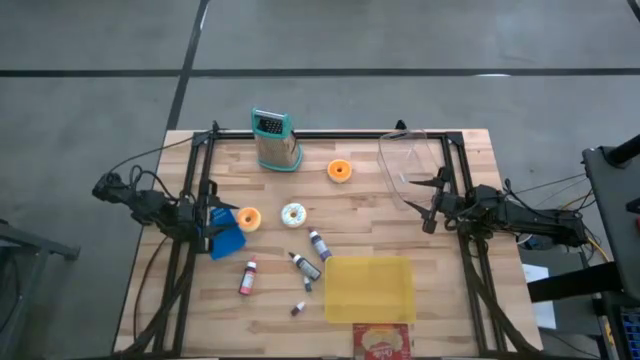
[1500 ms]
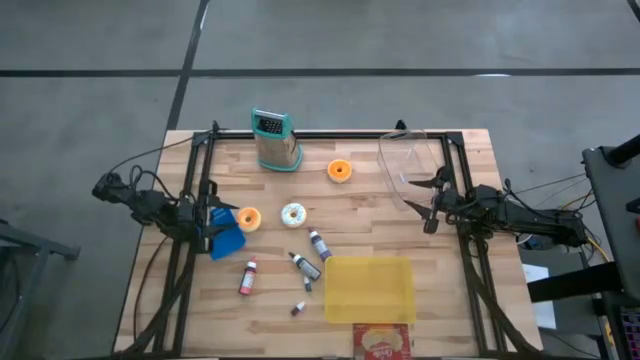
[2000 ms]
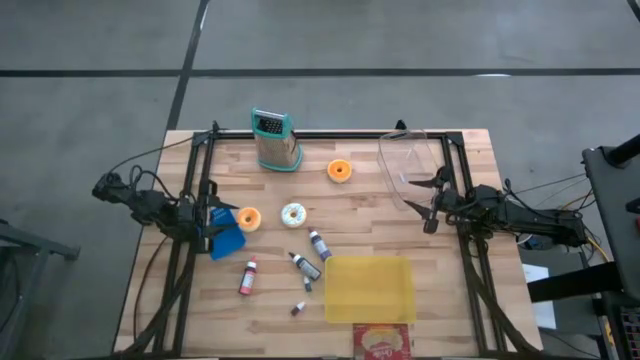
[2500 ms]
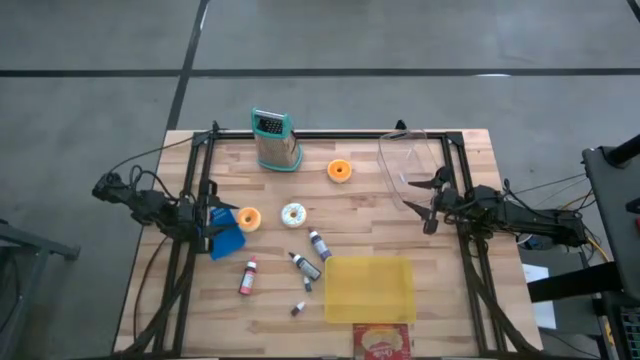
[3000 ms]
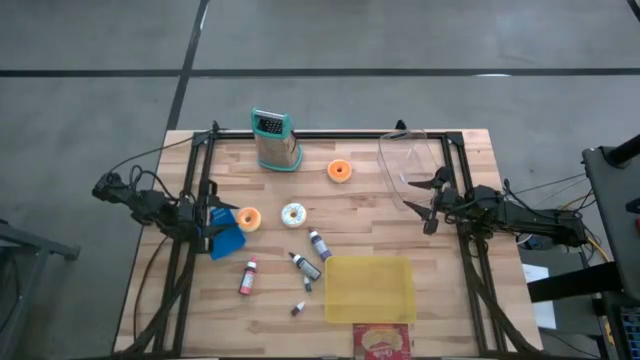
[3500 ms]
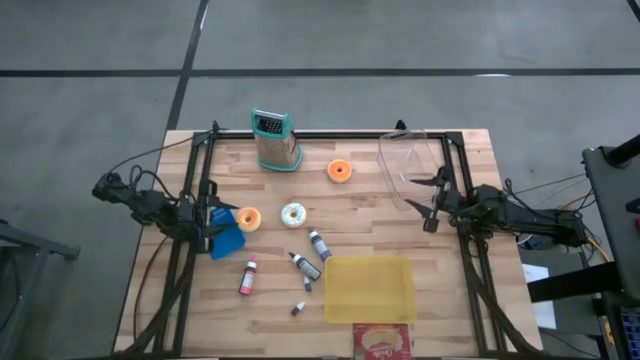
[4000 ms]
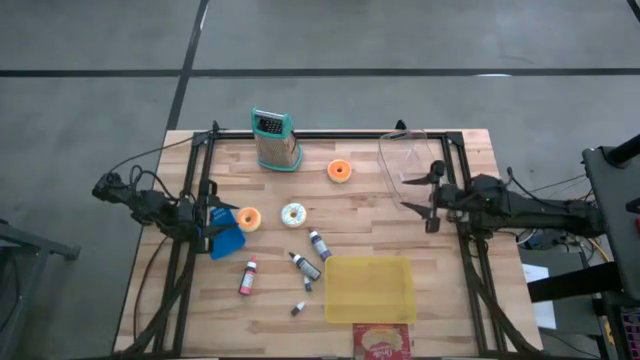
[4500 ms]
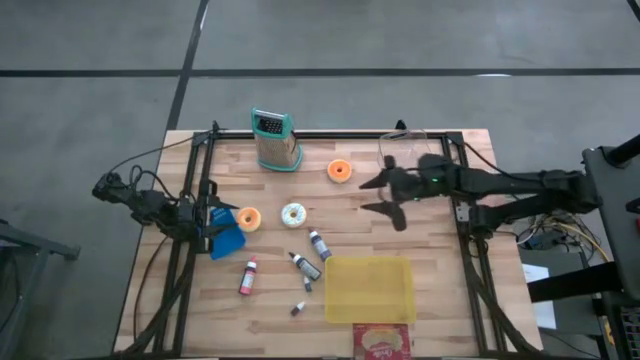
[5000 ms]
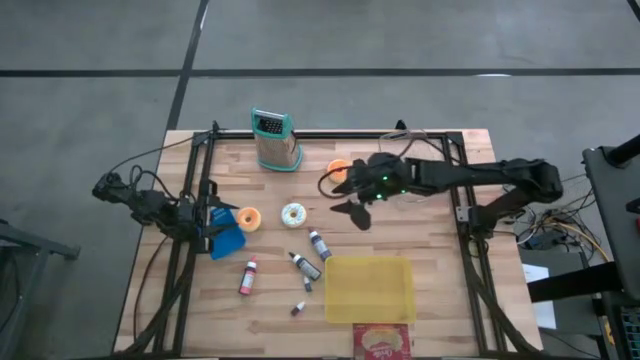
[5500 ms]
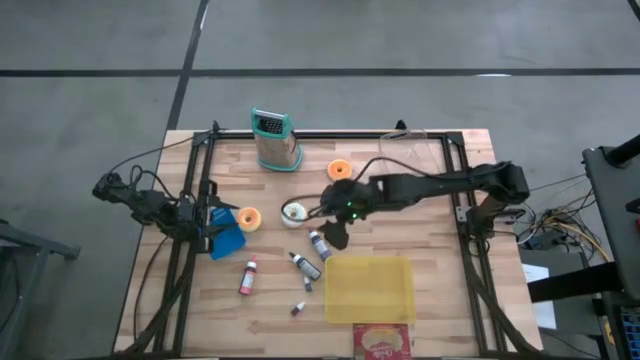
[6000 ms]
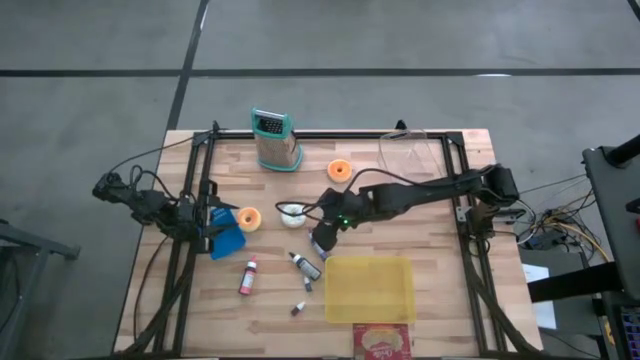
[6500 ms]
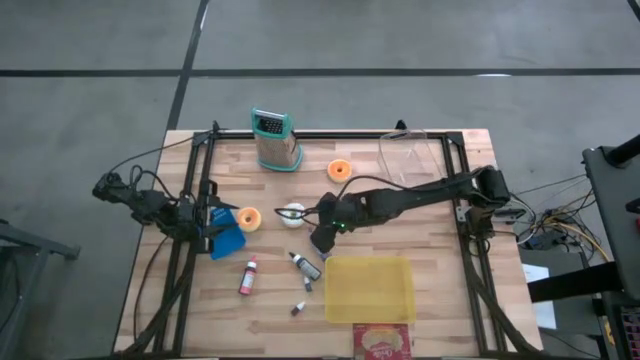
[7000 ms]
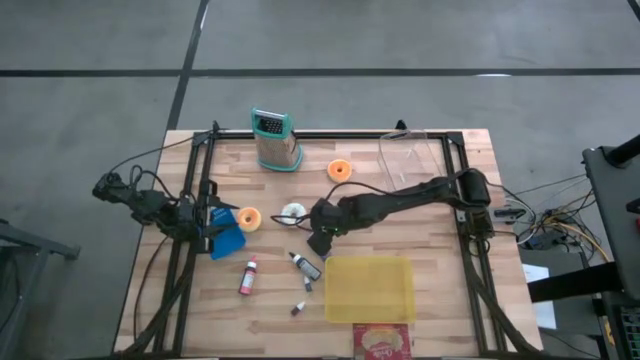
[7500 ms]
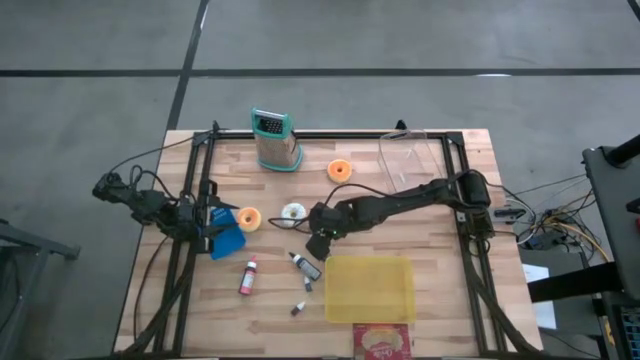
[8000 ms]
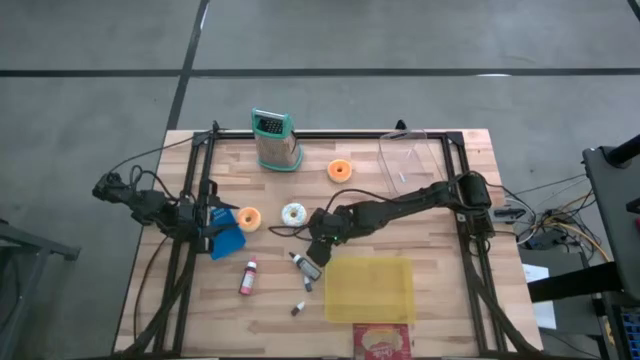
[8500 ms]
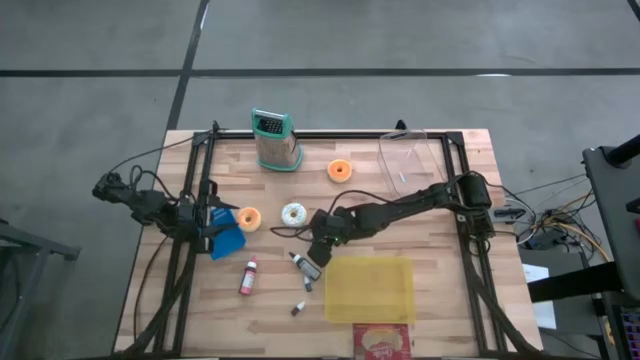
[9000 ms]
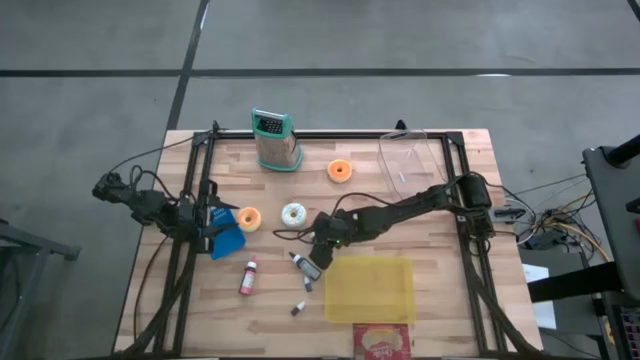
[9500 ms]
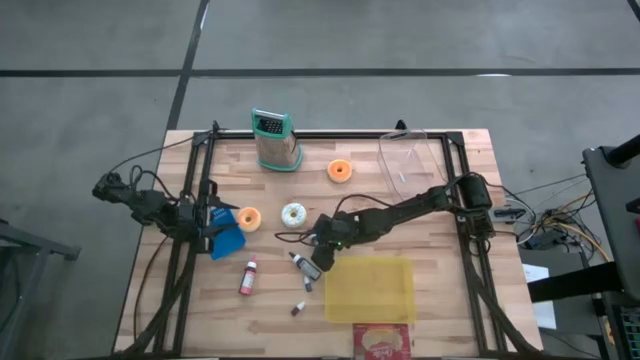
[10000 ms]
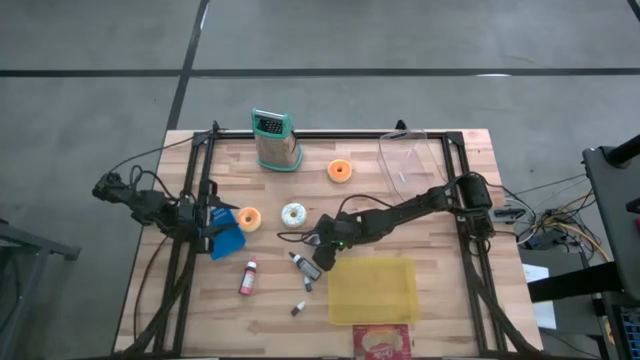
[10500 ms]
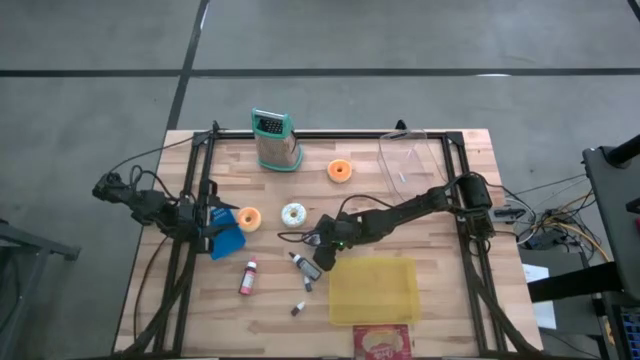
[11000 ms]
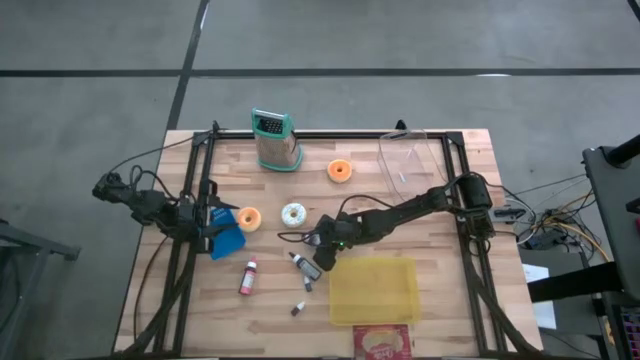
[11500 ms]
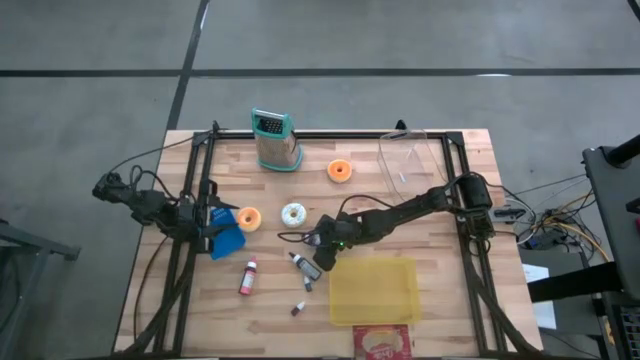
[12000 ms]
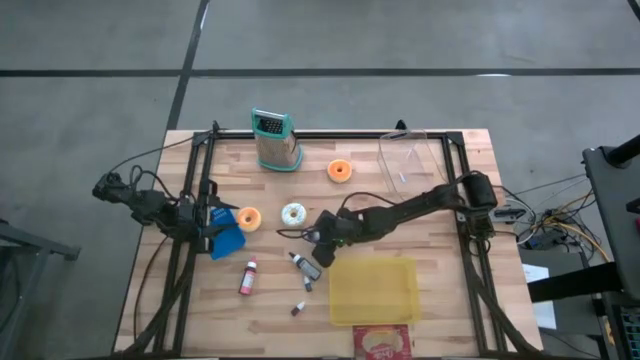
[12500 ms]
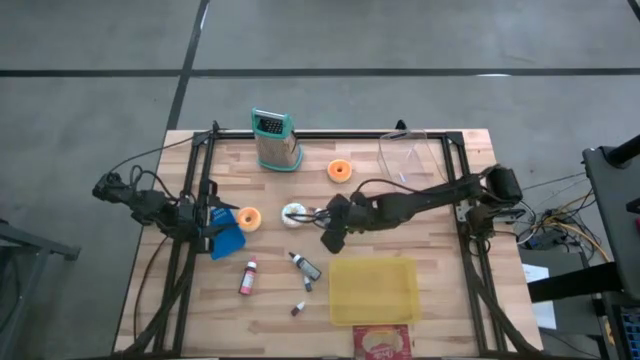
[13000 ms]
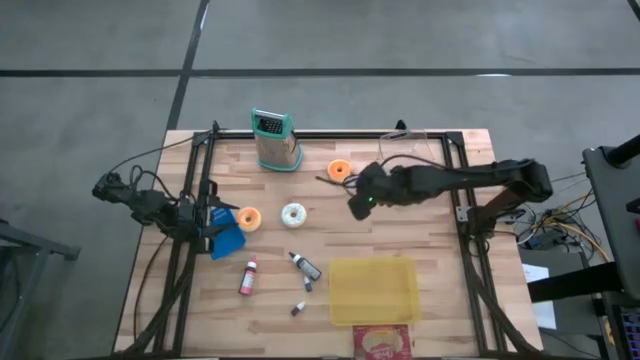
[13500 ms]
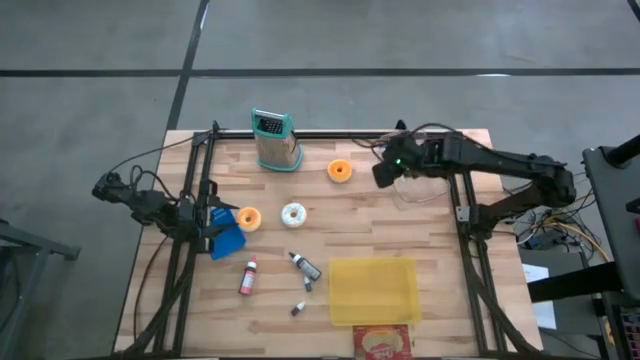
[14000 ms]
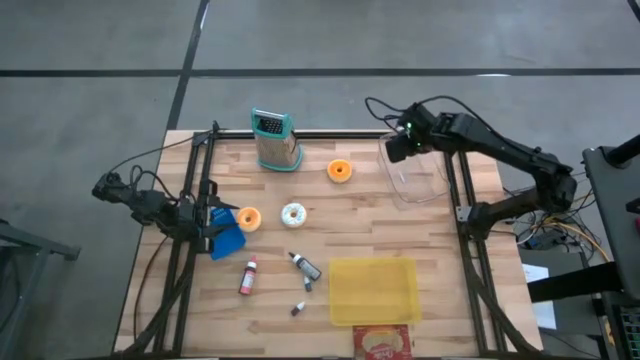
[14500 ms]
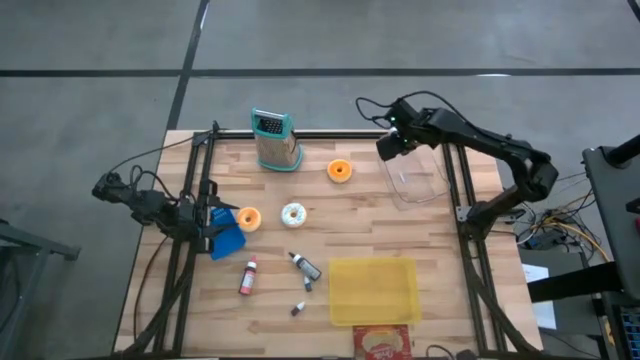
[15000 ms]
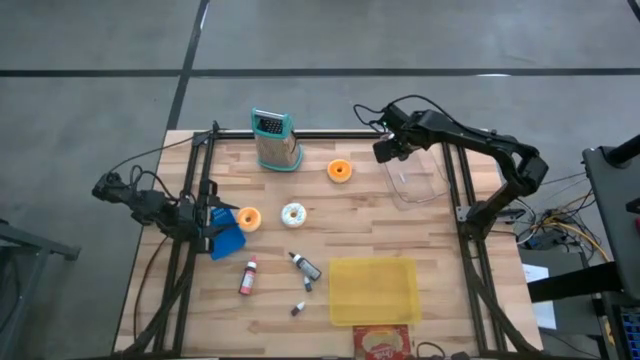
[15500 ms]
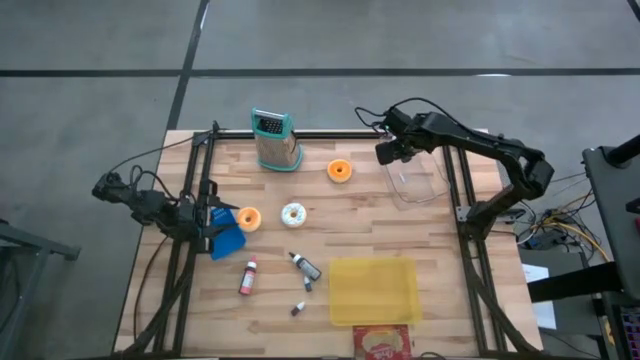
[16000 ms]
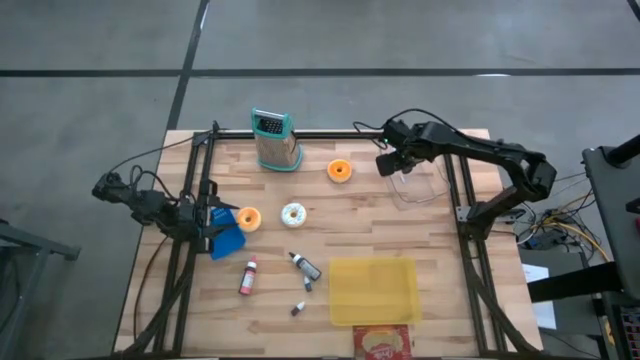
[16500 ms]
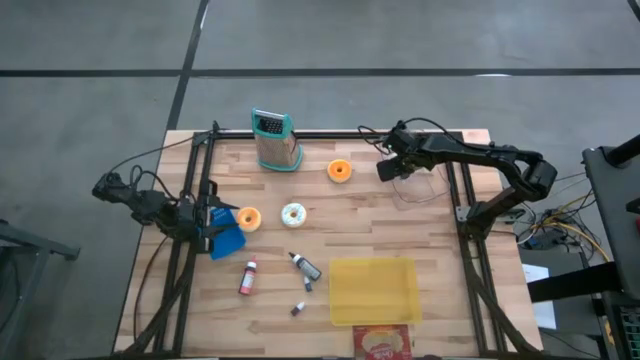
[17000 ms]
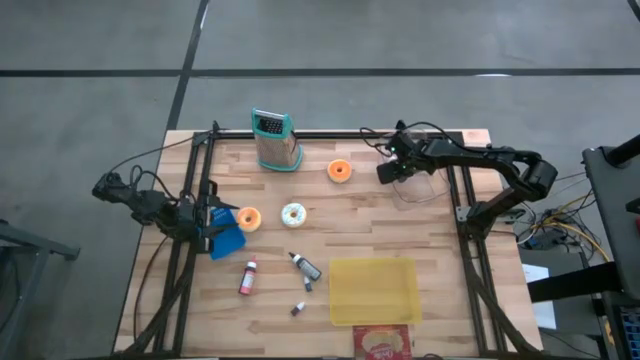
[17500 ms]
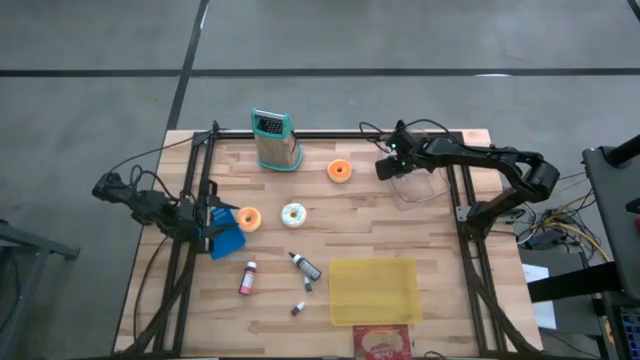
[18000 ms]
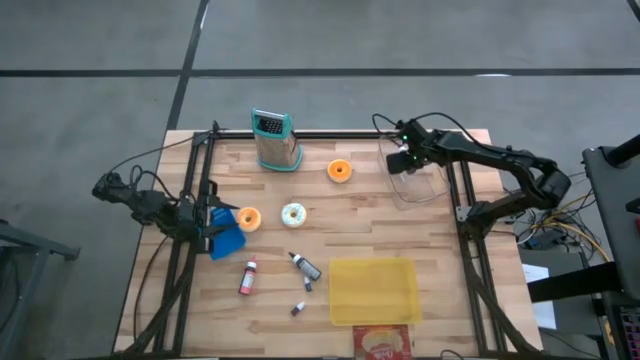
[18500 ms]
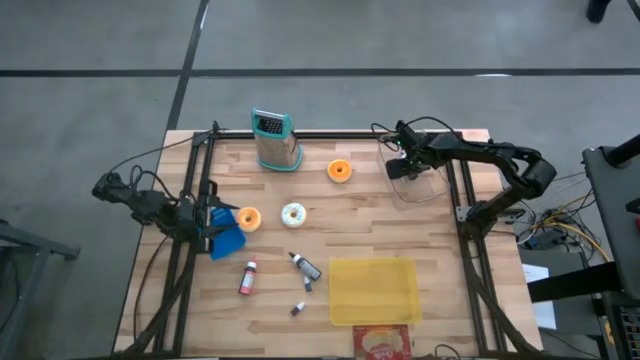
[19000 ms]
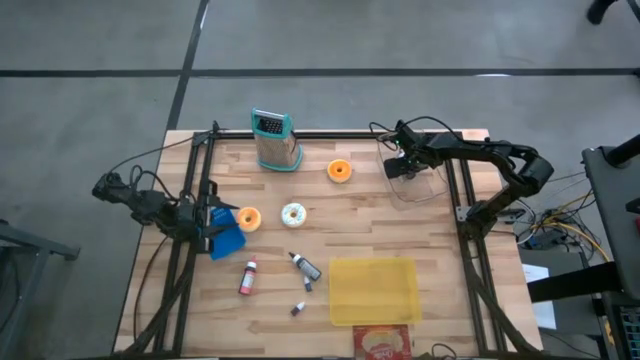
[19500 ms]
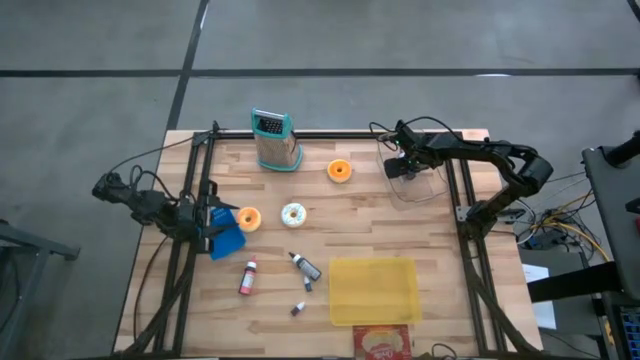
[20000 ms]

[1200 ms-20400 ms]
Task: Pick & Place Food Item
Put the violet food coloring bottle into the transparent bin

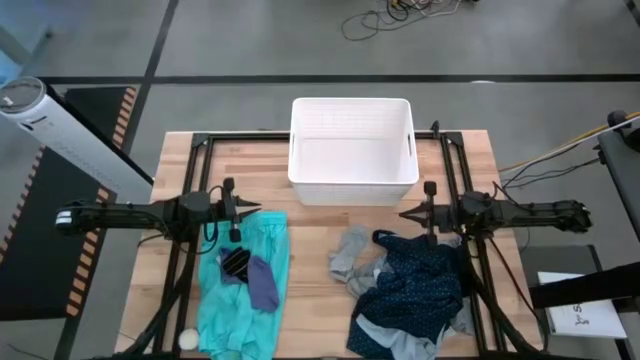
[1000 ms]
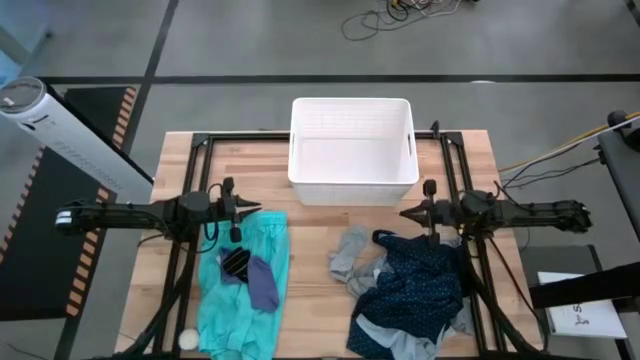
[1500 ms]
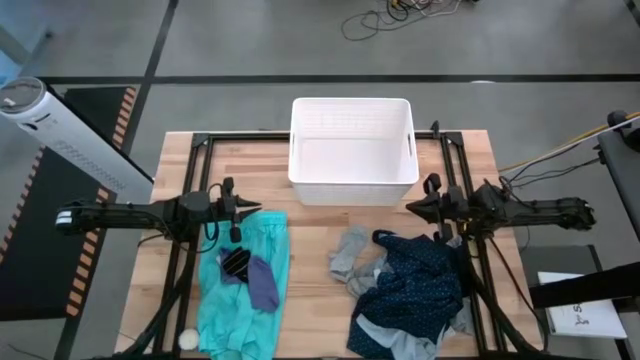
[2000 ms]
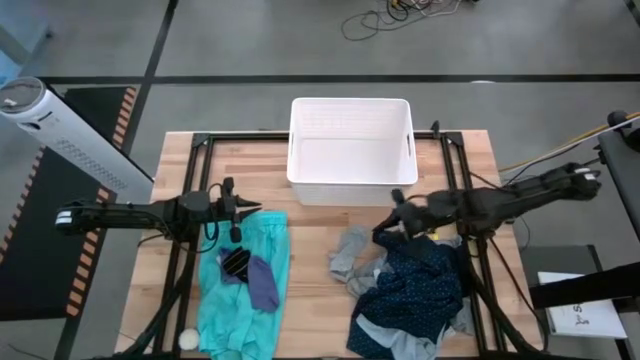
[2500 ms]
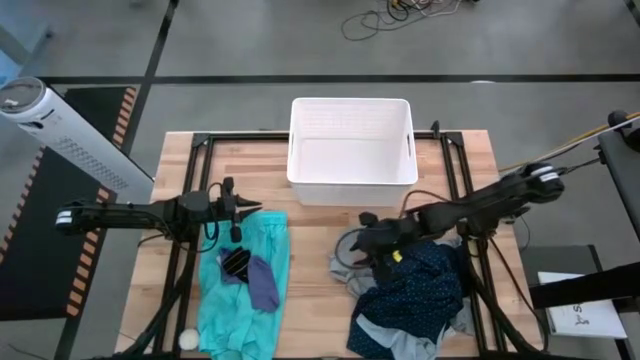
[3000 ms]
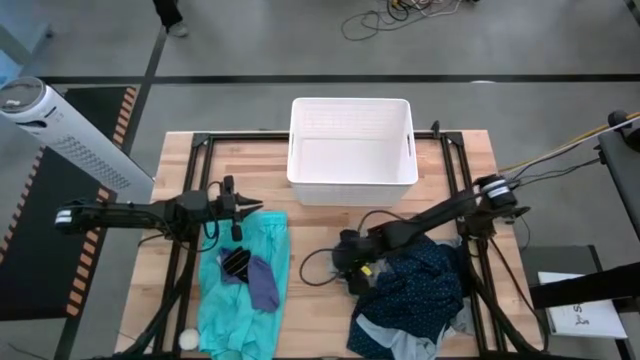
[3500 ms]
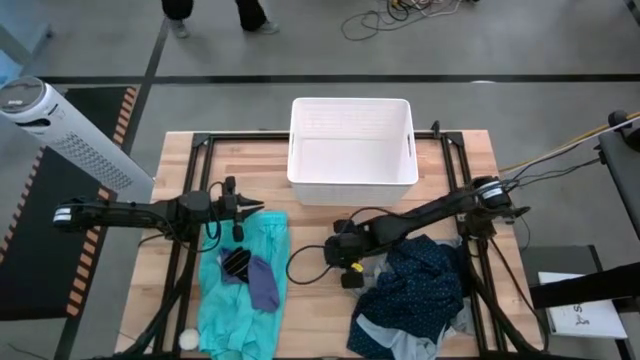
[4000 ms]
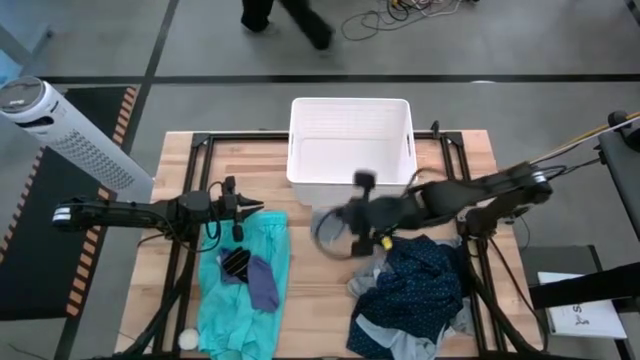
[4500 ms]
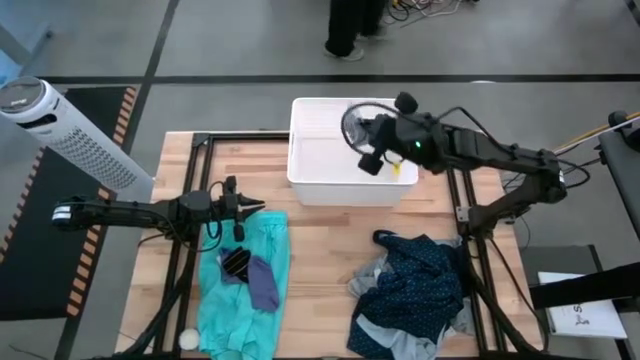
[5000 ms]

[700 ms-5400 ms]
Task: Sort clothes
Put the gray sock into the laundry bin
